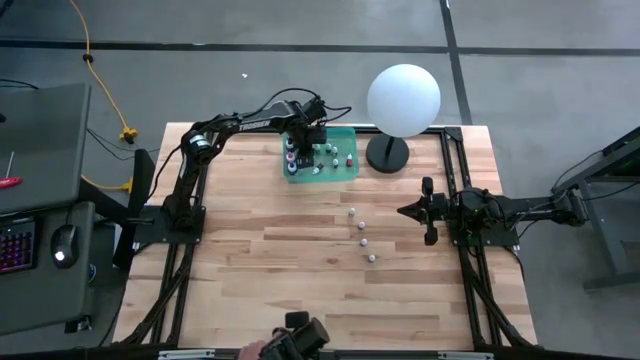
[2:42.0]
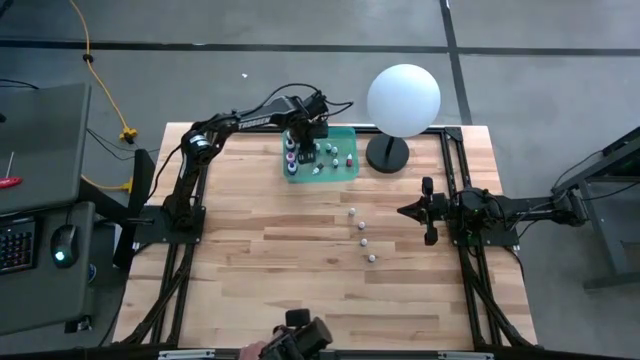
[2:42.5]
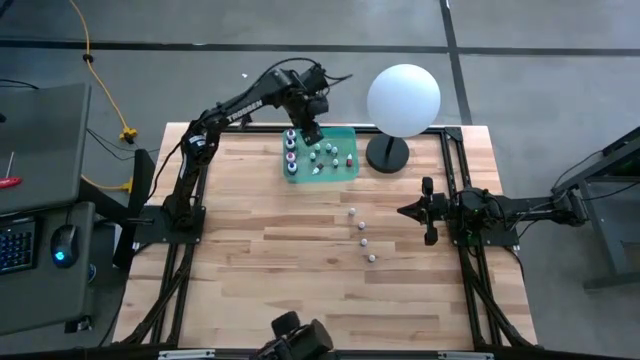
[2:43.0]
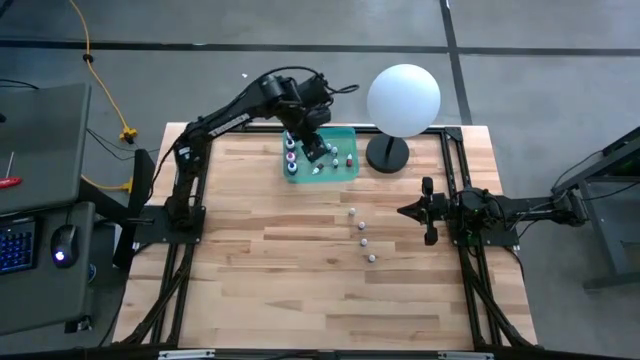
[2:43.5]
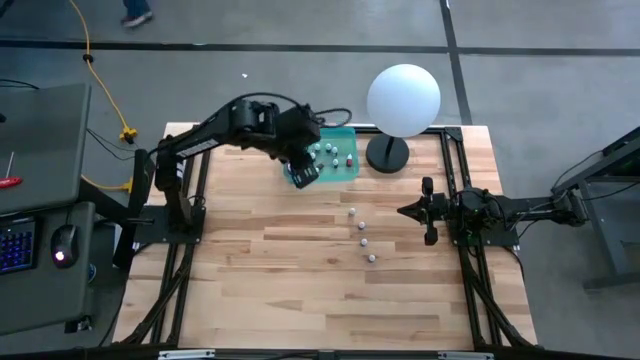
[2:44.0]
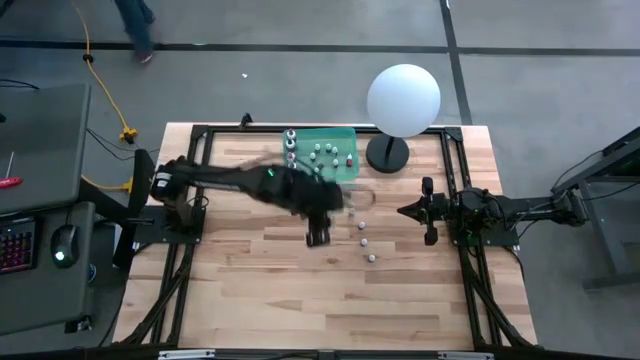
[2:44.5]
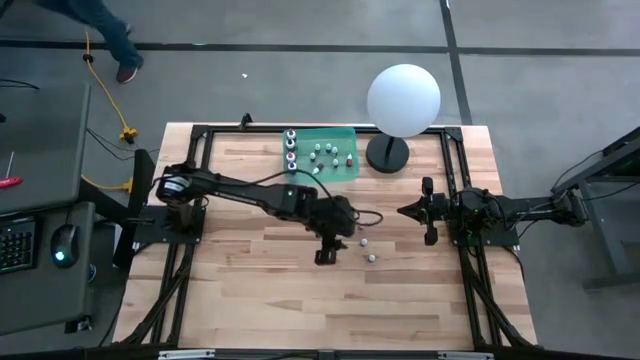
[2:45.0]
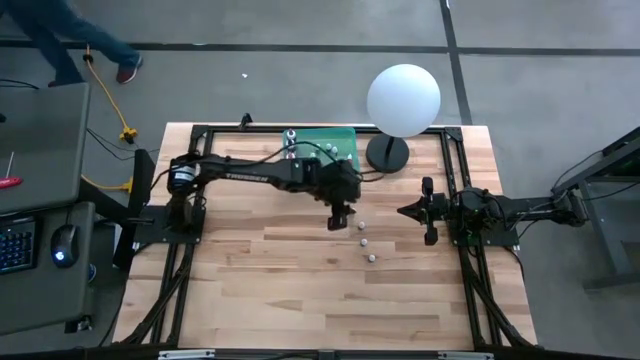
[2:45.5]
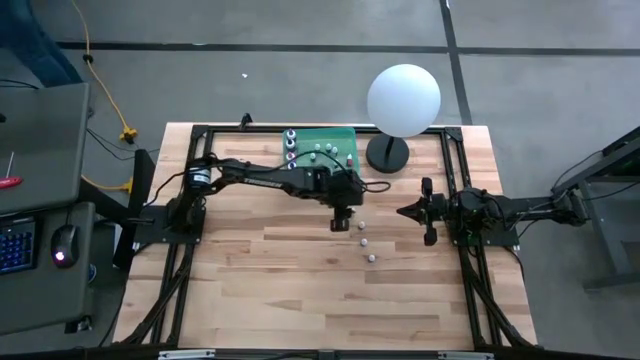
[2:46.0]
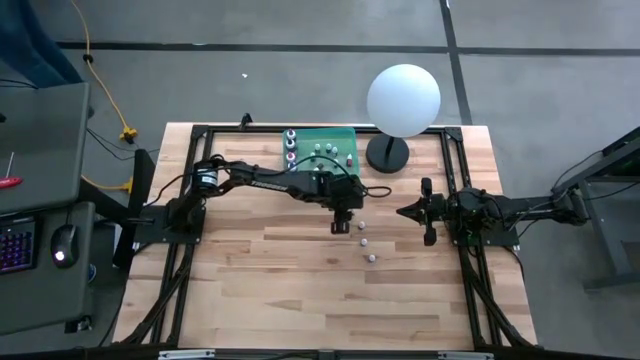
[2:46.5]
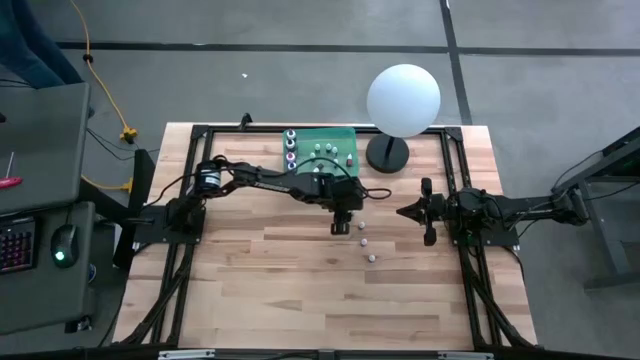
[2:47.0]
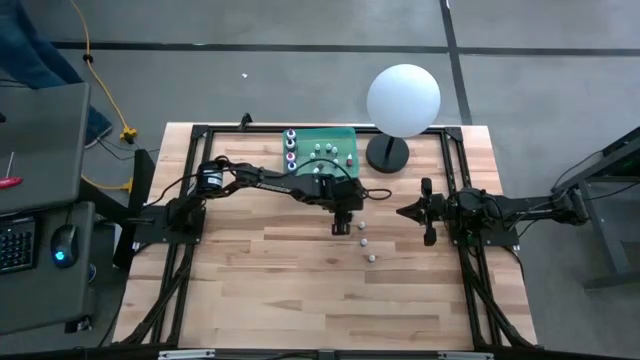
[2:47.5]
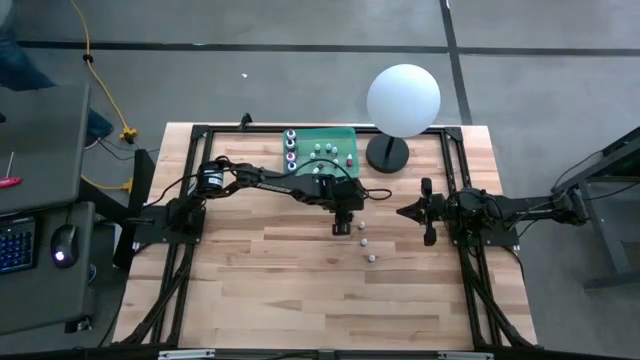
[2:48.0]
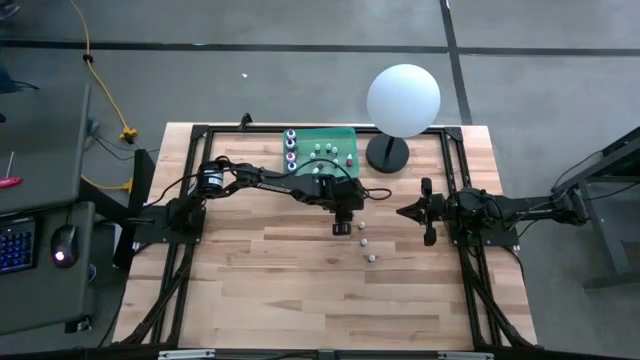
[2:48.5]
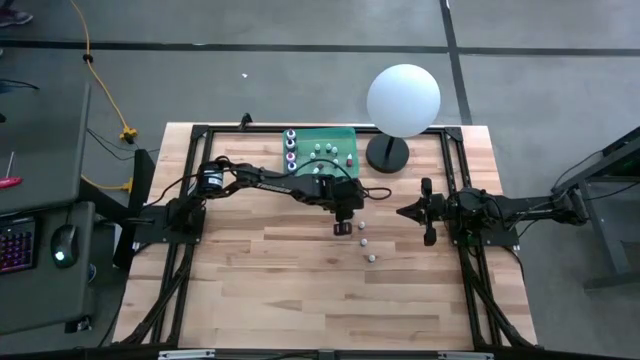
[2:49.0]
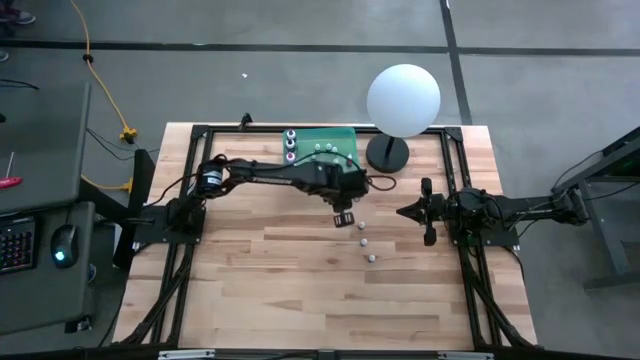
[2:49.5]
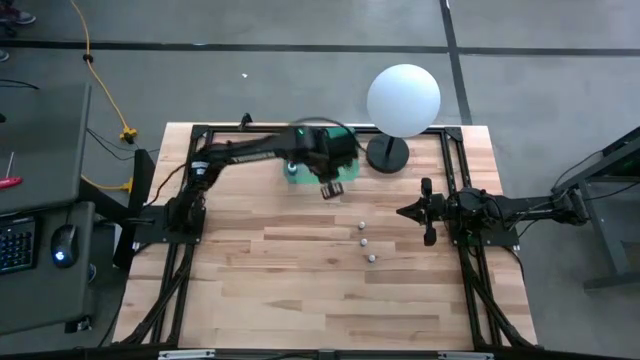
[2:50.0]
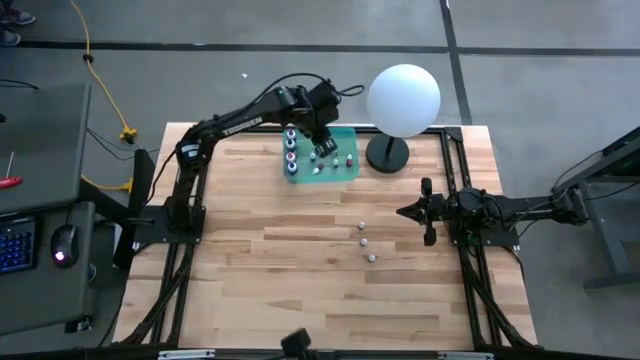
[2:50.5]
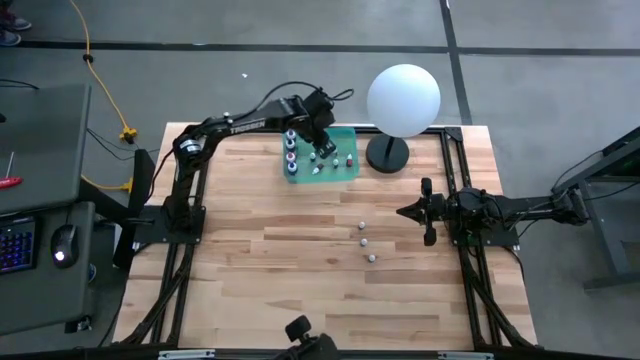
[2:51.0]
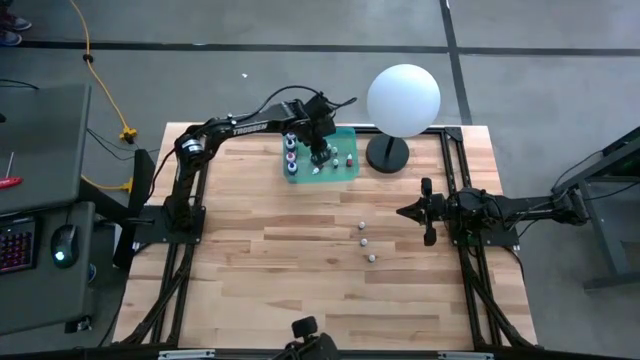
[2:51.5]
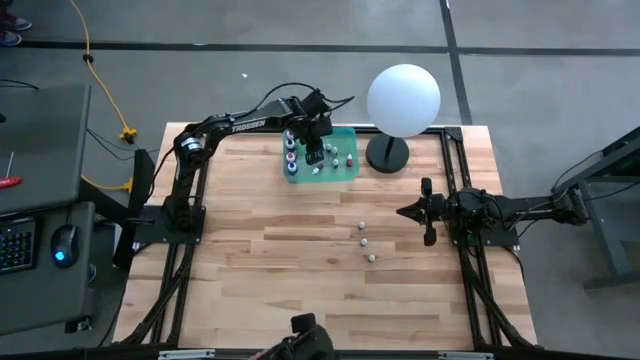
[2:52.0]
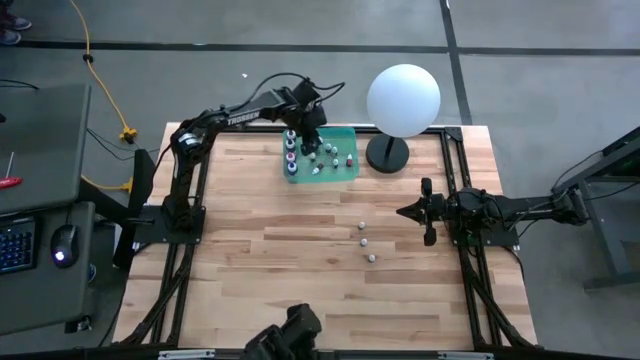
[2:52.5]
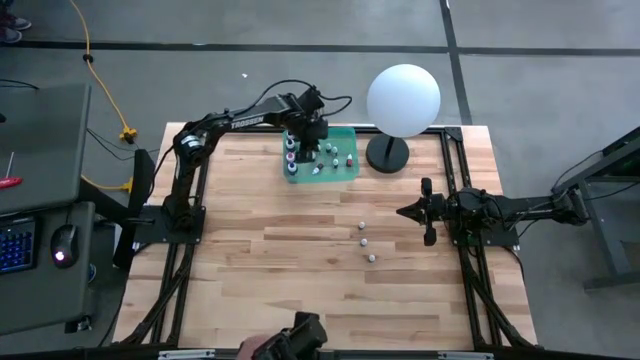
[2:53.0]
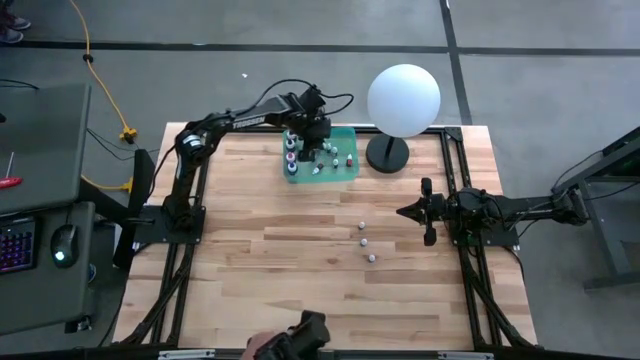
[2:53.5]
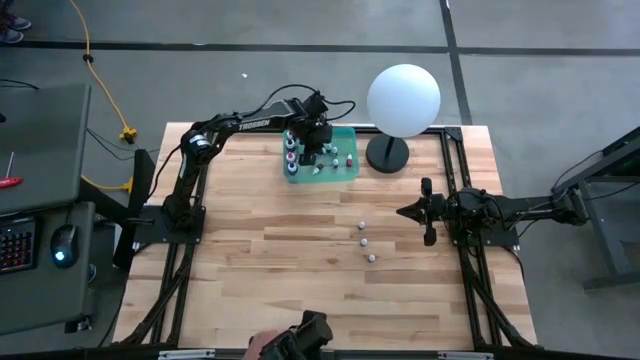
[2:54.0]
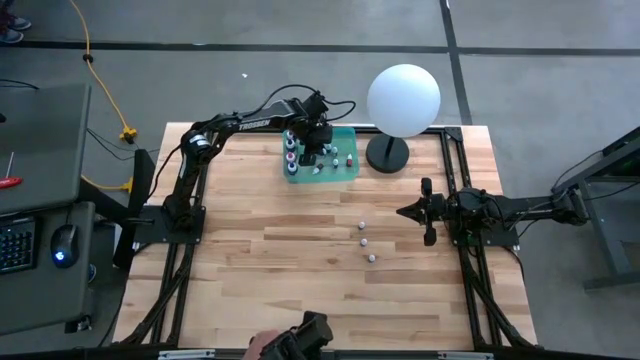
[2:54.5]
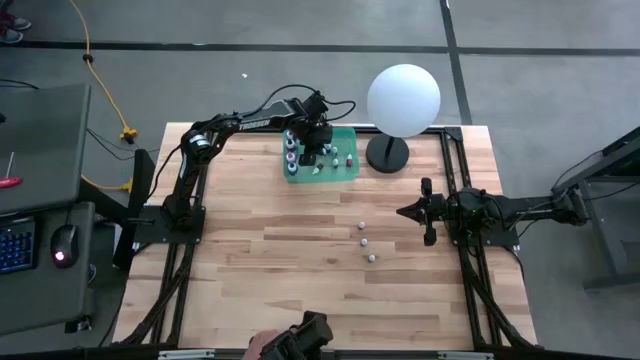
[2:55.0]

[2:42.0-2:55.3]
Task: Pick & Place food coloring
Put the small black food coloring bottle into the green bin

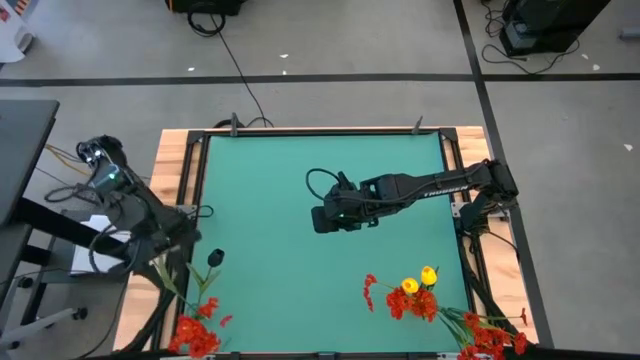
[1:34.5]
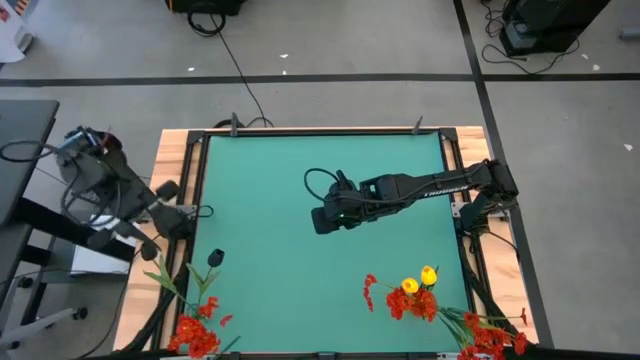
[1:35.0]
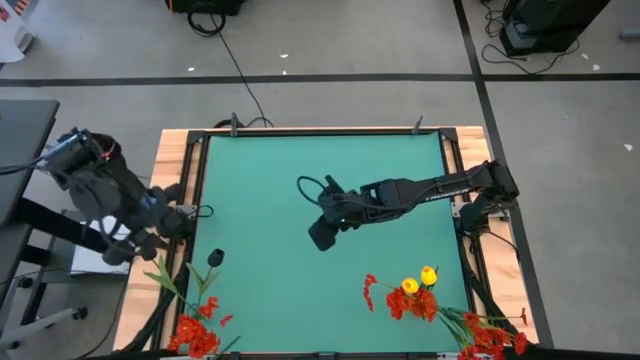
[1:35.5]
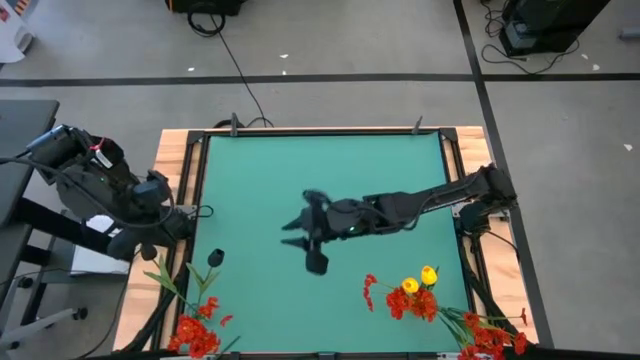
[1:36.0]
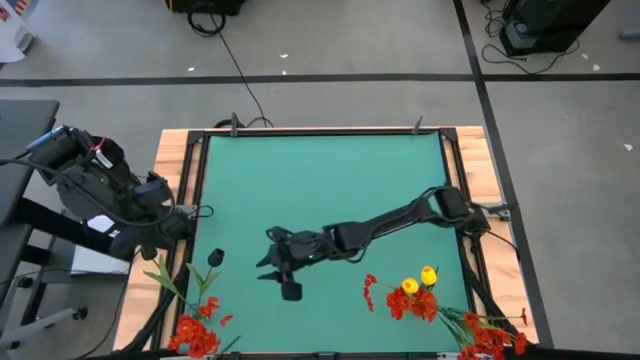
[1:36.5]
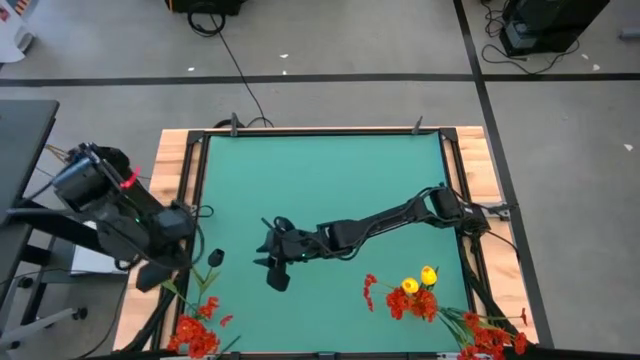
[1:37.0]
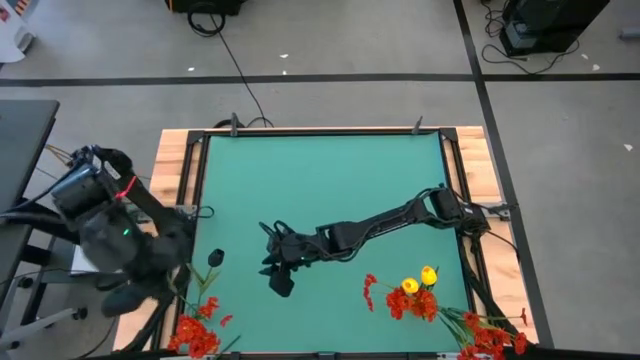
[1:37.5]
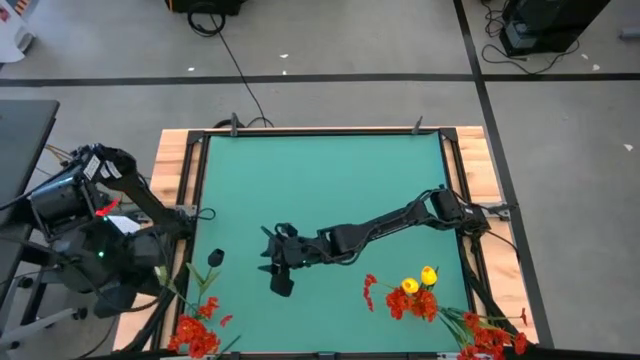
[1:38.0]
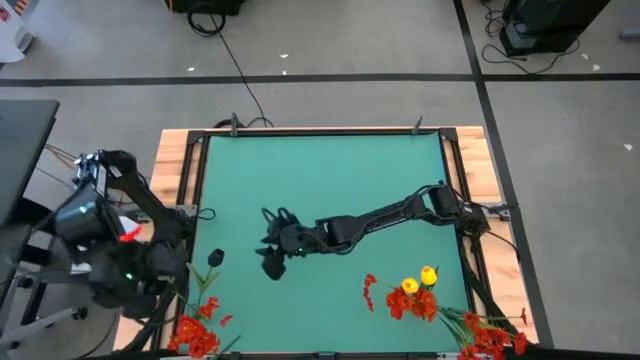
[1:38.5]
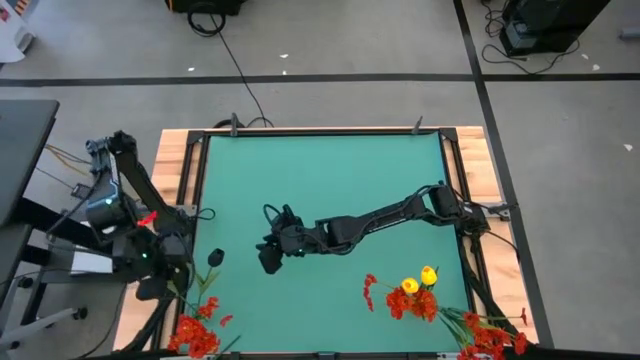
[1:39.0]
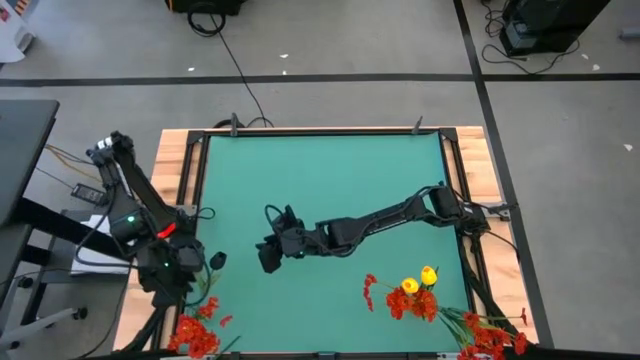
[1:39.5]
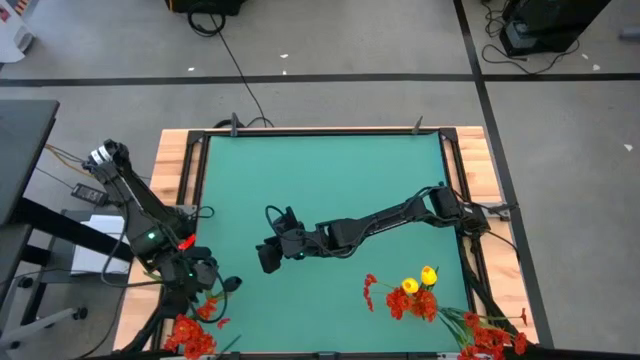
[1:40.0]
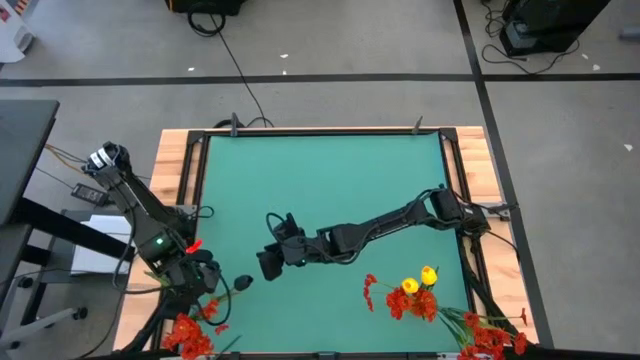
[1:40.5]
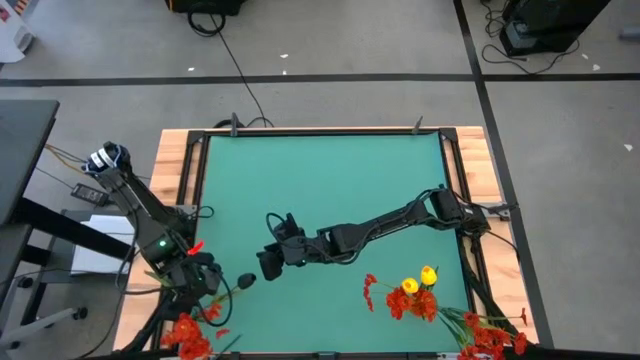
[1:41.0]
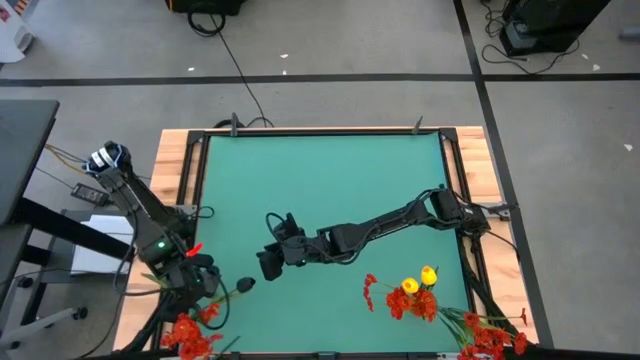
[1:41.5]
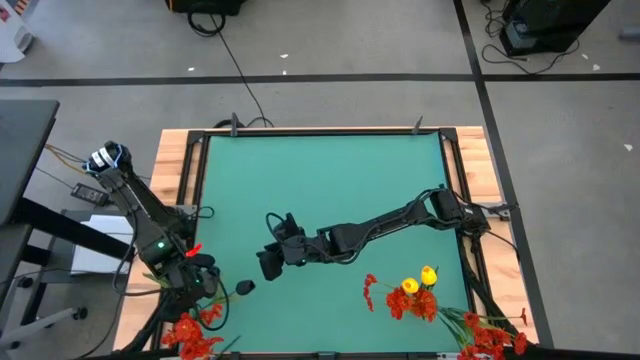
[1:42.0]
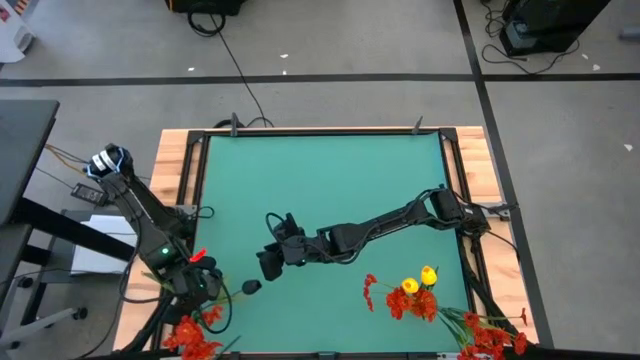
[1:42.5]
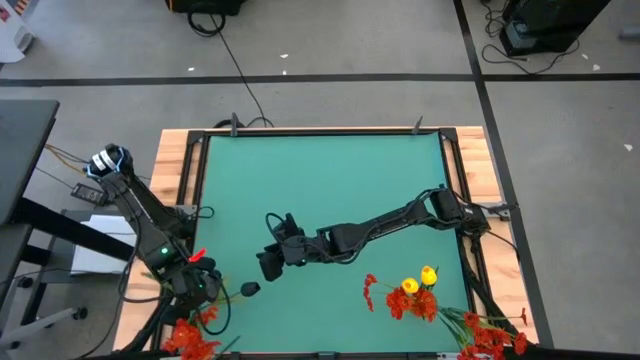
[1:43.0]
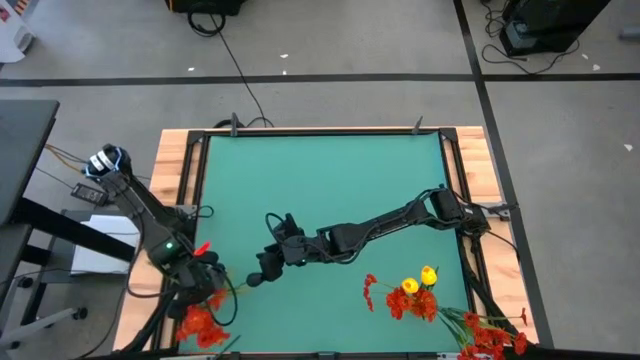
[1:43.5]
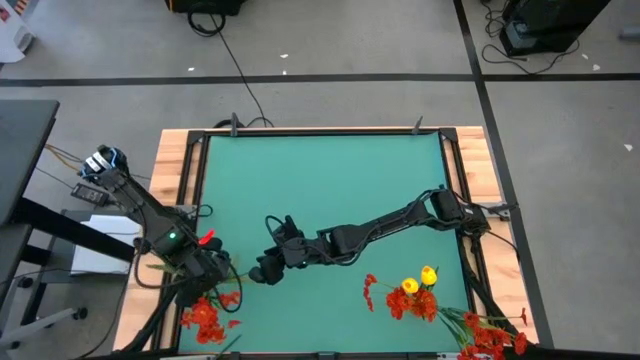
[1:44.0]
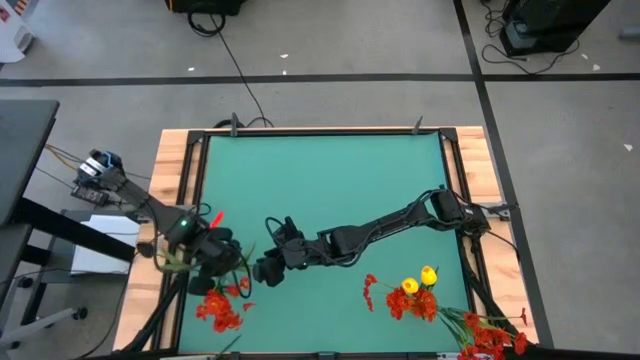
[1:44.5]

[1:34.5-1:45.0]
Task: Sort flowers into vase by color
Adjust the transparent flower vase
